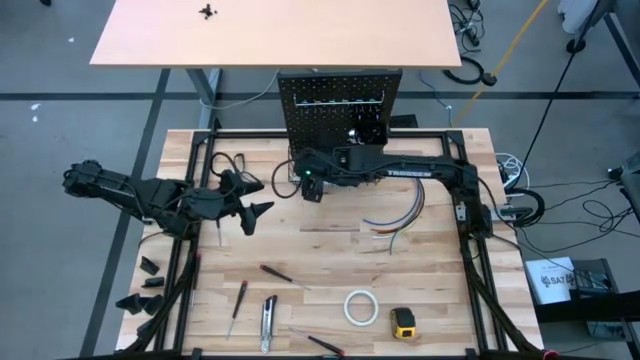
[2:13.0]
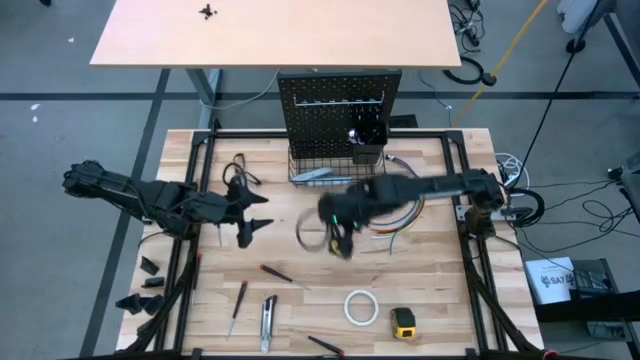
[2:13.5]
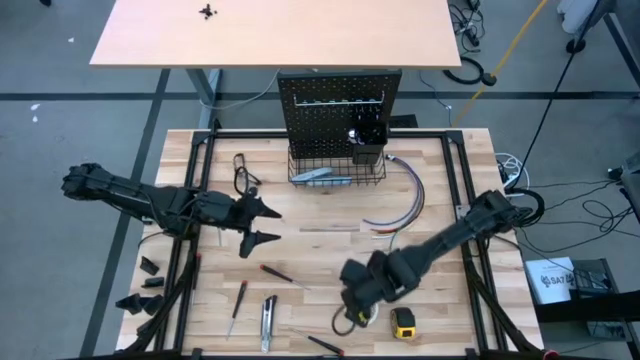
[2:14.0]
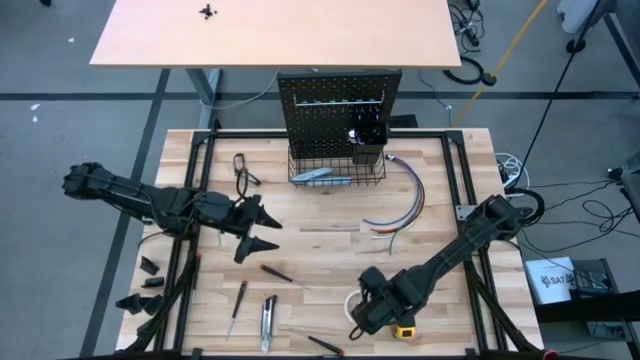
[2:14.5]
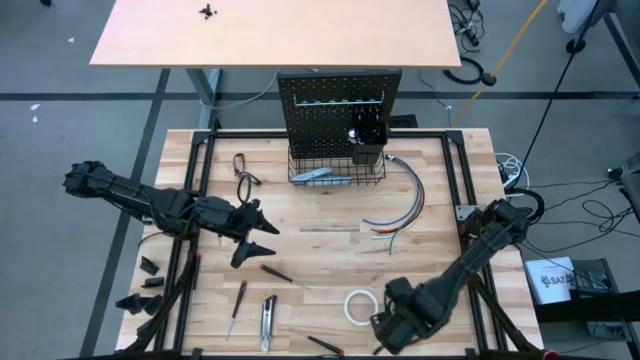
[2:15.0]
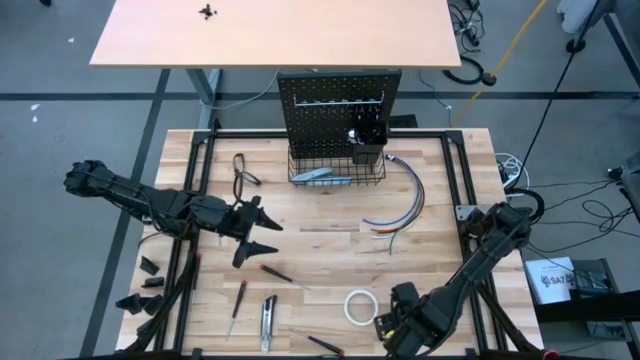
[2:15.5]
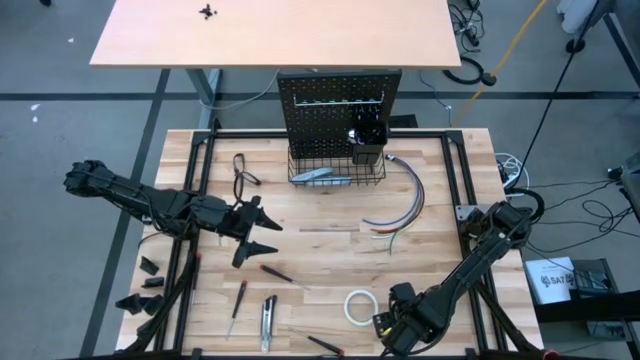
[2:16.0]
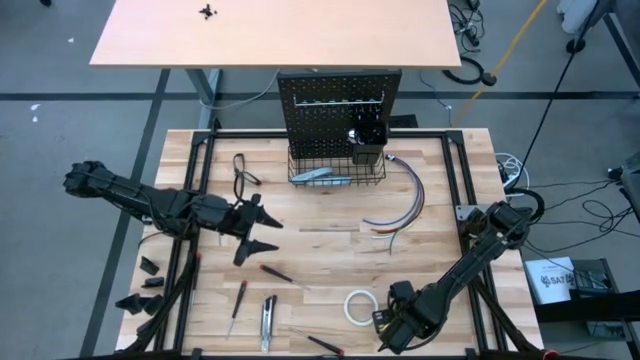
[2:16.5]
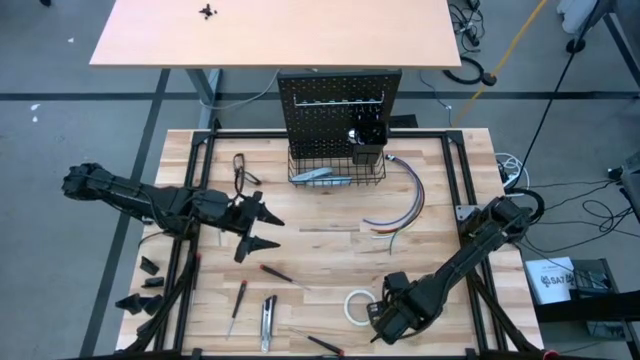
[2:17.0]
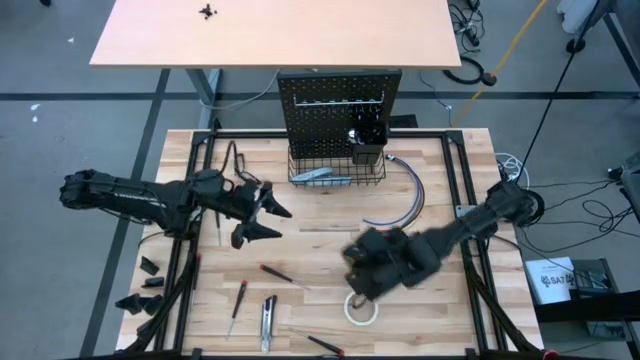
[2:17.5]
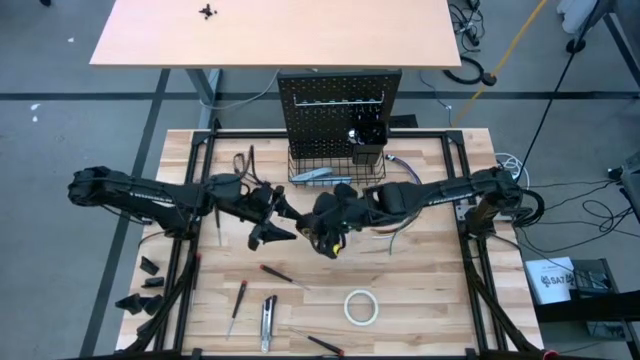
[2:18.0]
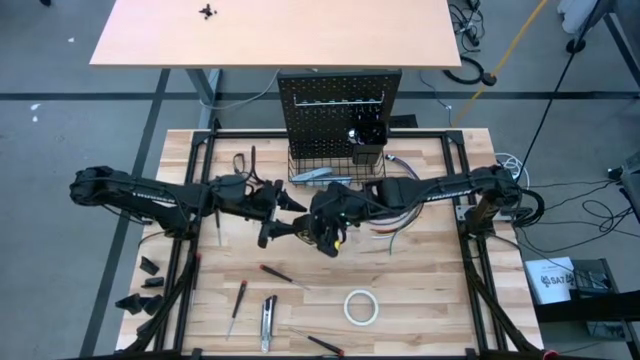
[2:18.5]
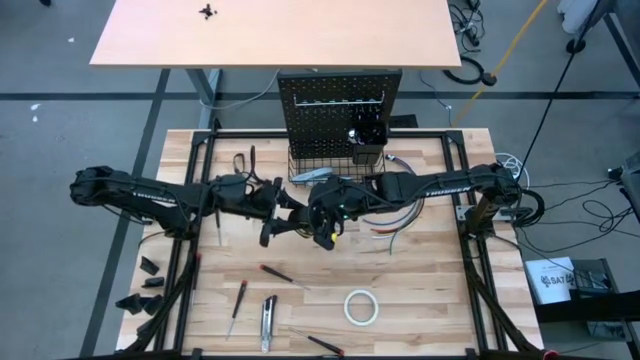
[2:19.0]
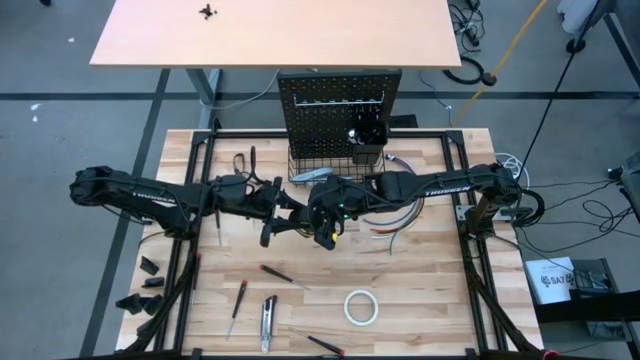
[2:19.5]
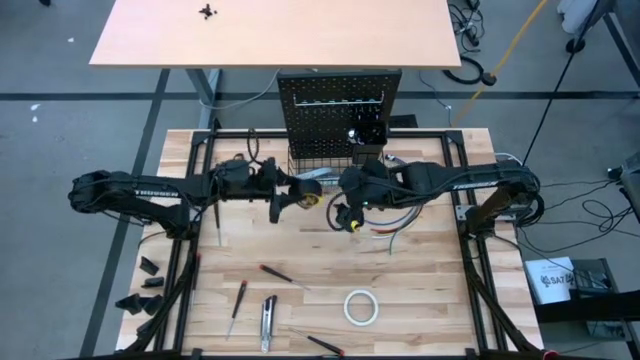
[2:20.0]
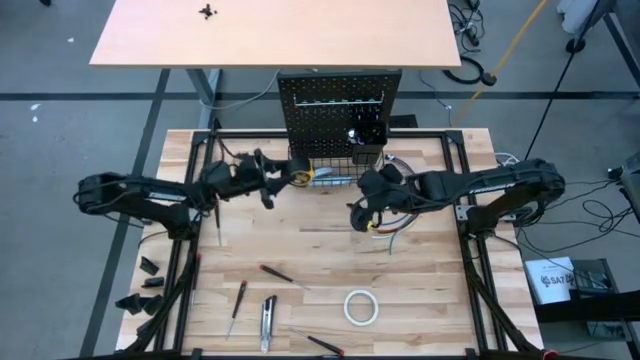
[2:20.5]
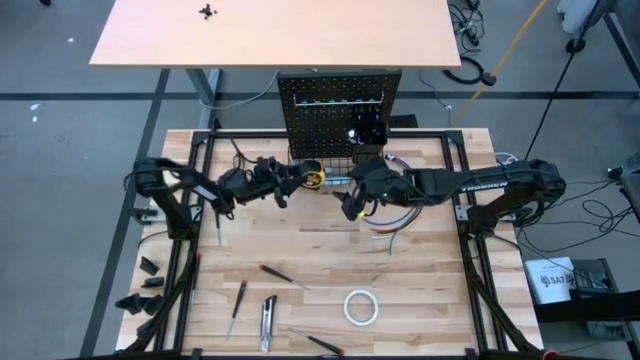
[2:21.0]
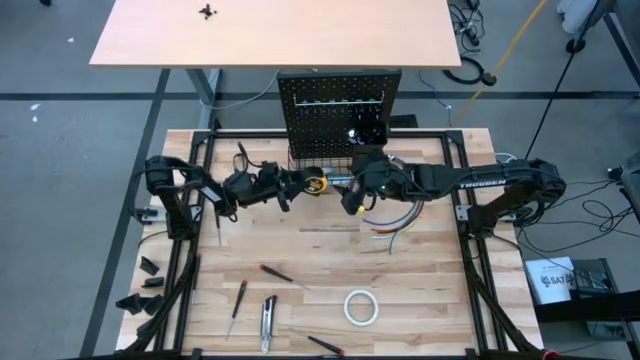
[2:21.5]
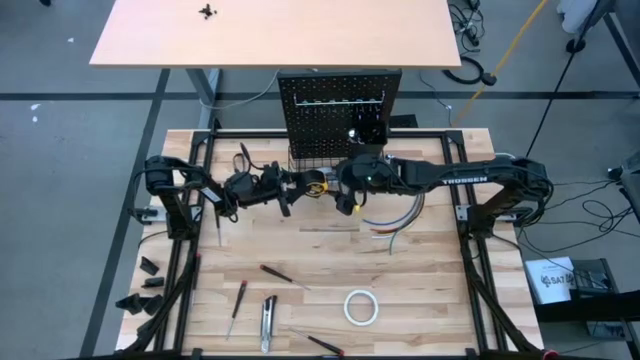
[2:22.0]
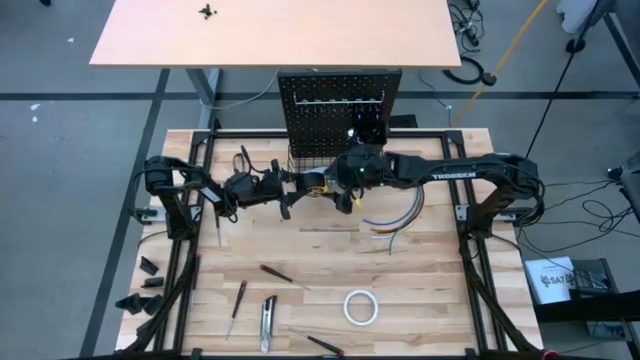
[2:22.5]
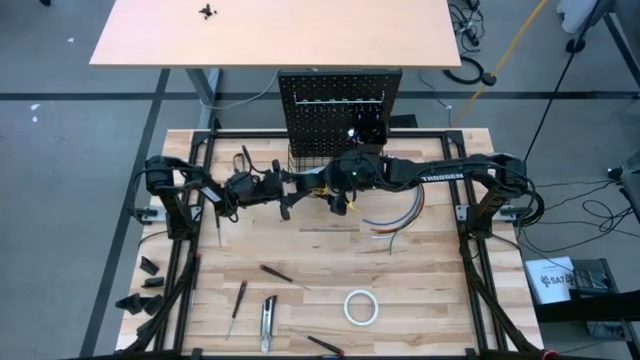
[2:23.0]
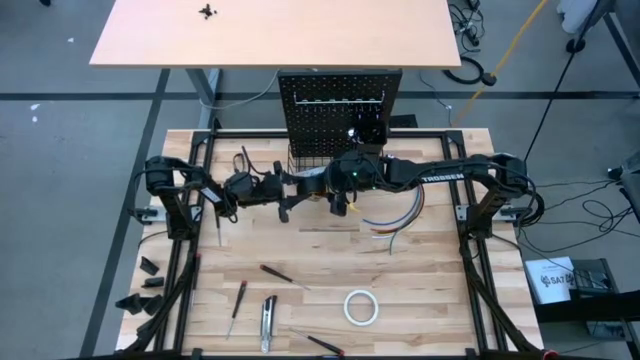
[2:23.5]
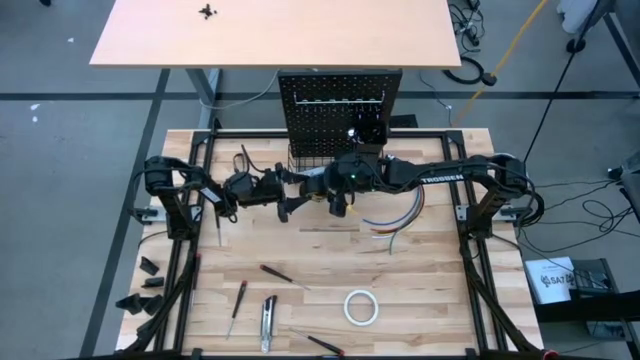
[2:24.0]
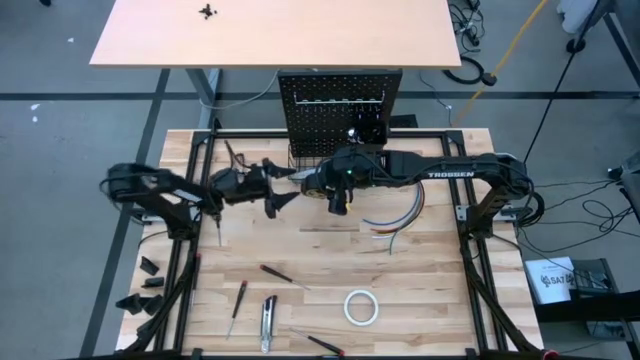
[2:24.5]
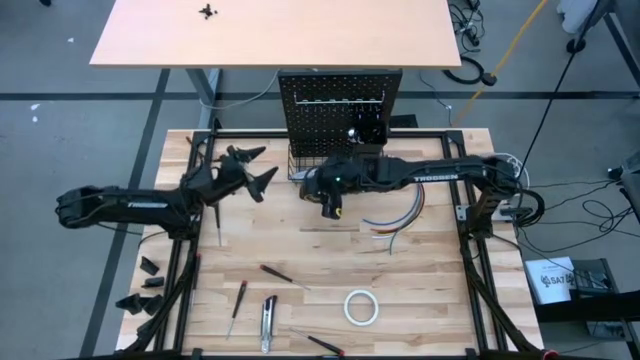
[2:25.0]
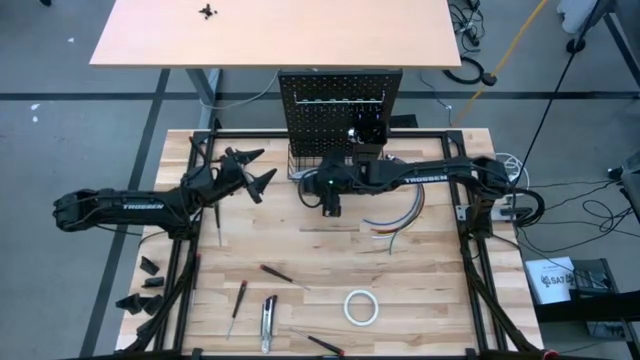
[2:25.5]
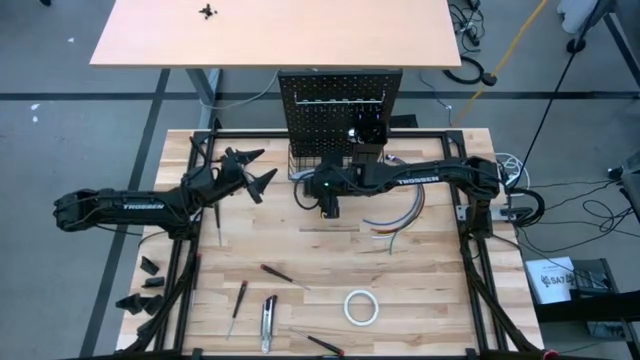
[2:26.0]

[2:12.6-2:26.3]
Task: Hang tools onto peg board
Hang the measuring tape on the wire basket on the peg board

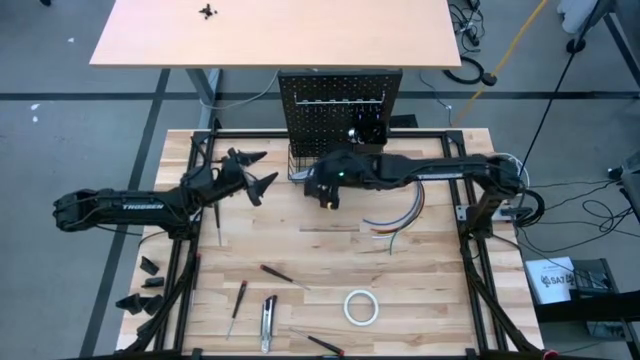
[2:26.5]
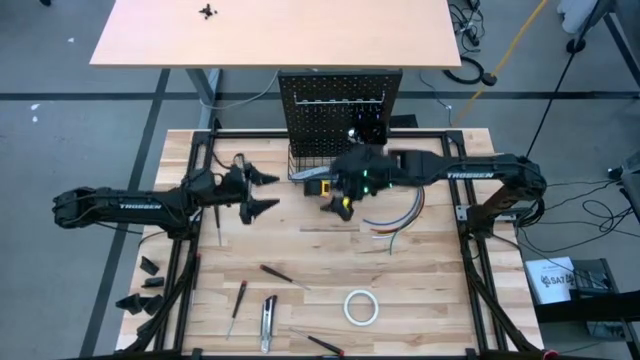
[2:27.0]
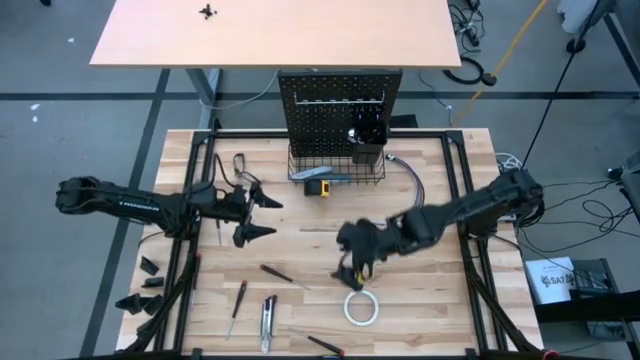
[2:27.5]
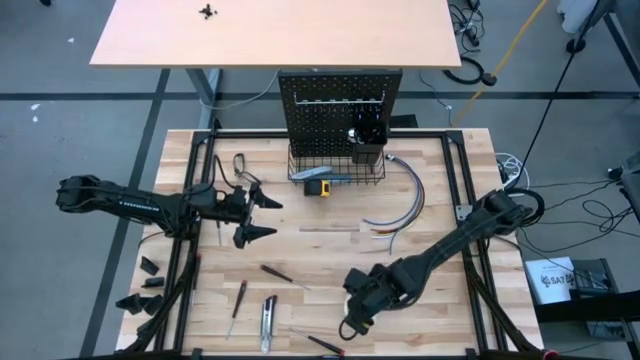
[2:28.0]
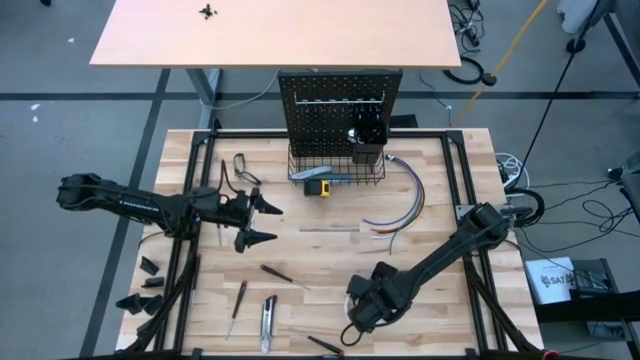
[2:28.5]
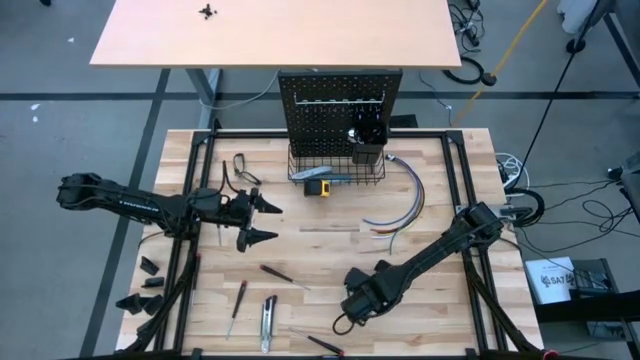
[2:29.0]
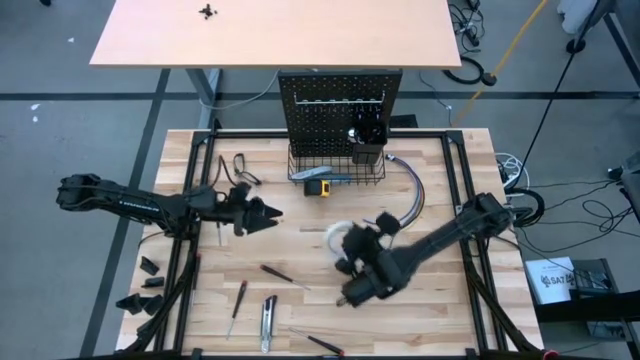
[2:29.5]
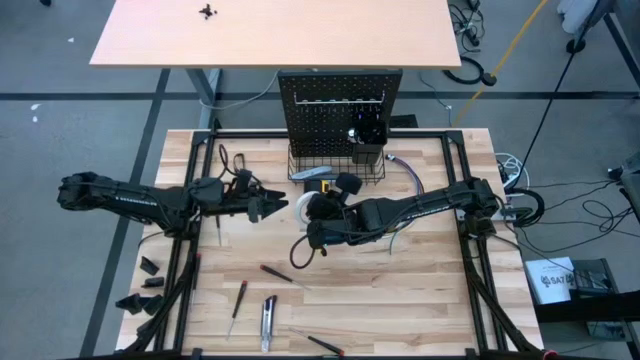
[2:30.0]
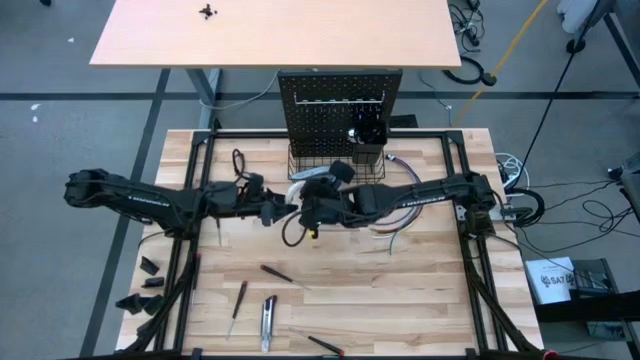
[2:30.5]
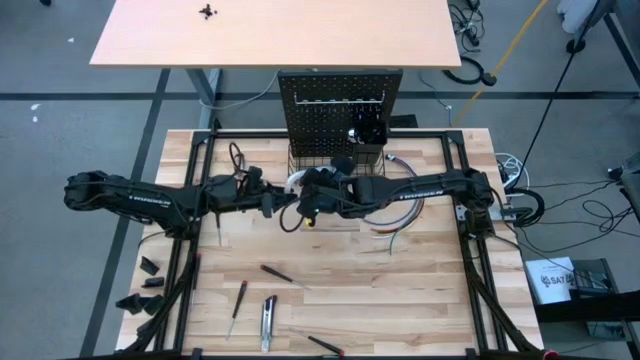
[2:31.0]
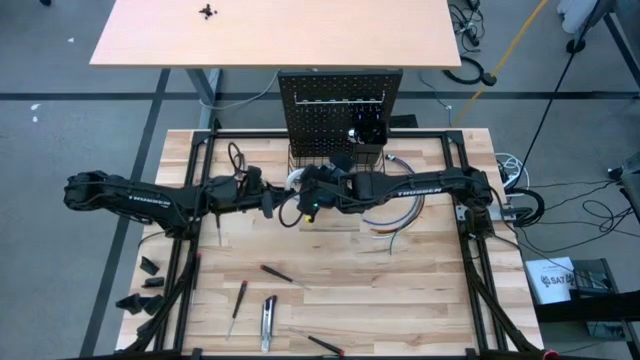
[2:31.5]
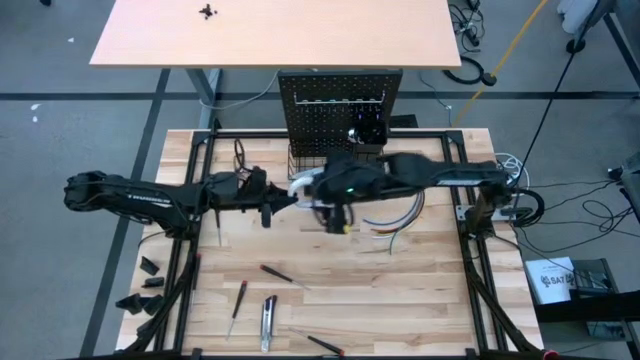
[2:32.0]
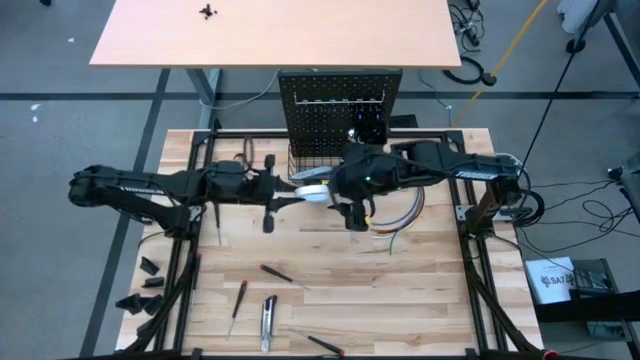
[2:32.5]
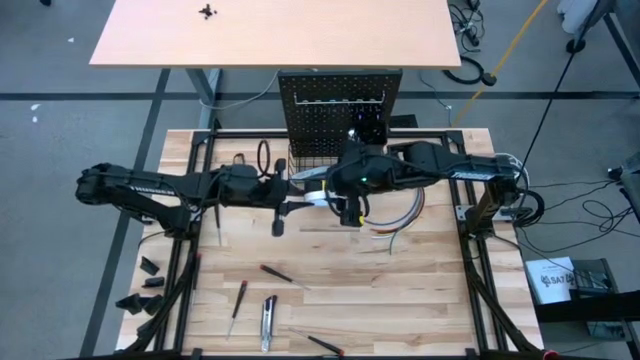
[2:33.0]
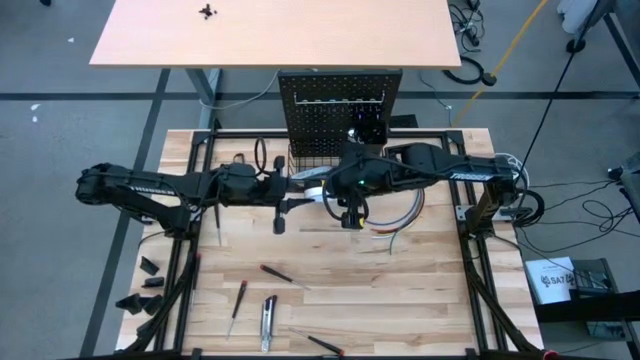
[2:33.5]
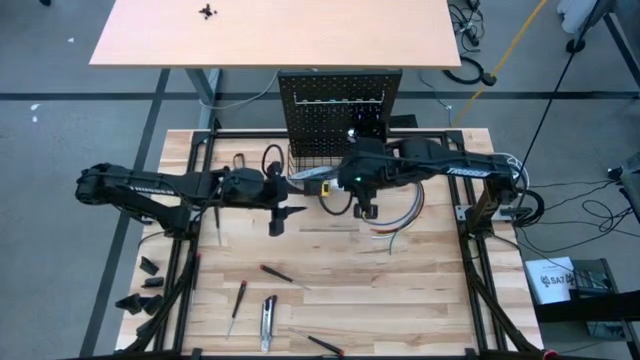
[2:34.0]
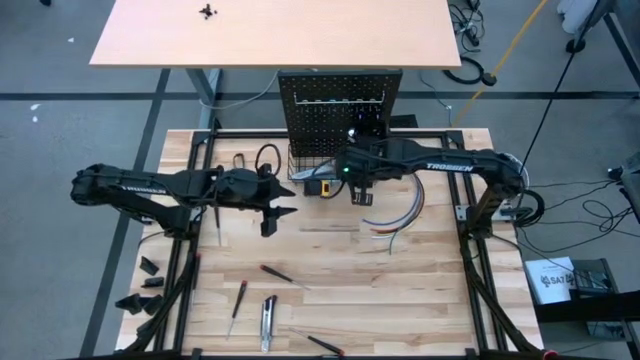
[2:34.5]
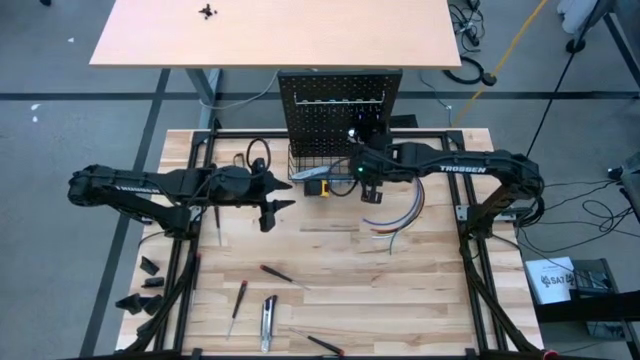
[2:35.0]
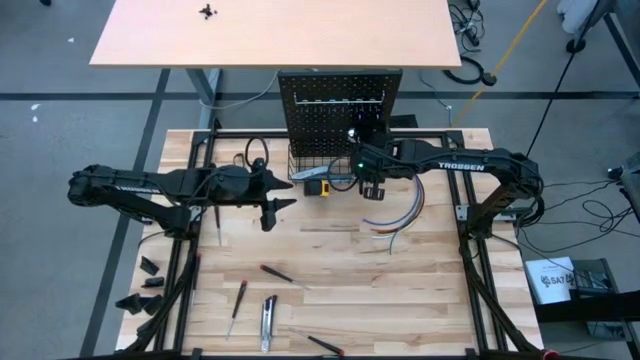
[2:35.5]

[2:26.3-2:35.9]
Put the tape into the wire basket on the pegboard
